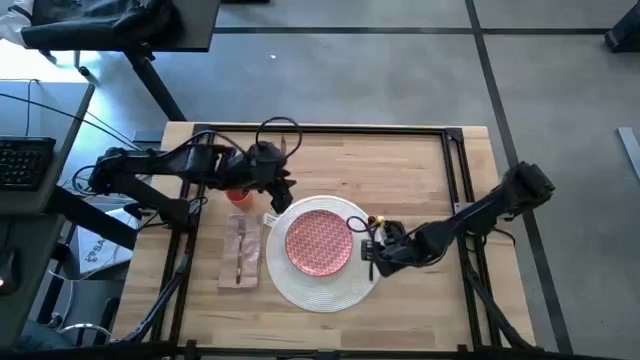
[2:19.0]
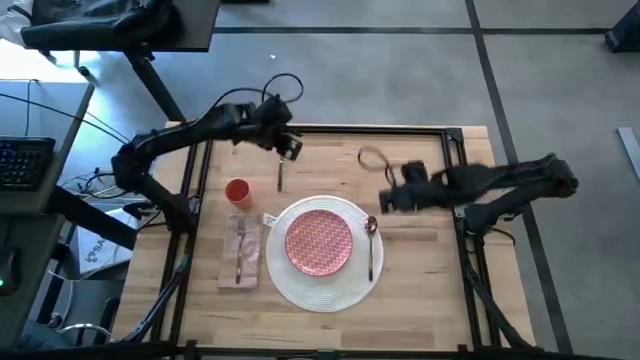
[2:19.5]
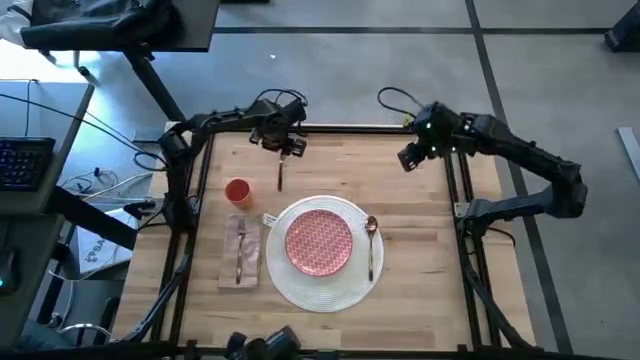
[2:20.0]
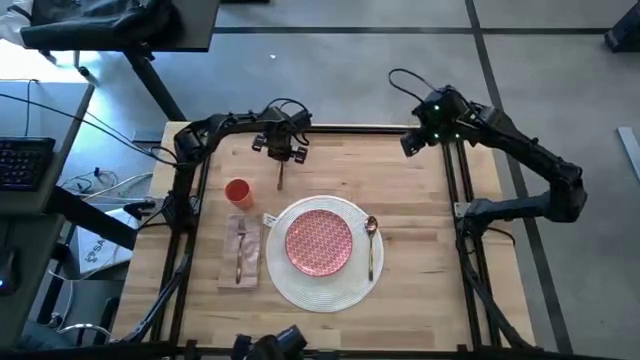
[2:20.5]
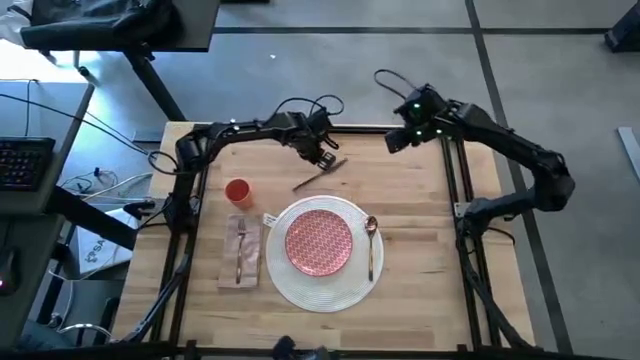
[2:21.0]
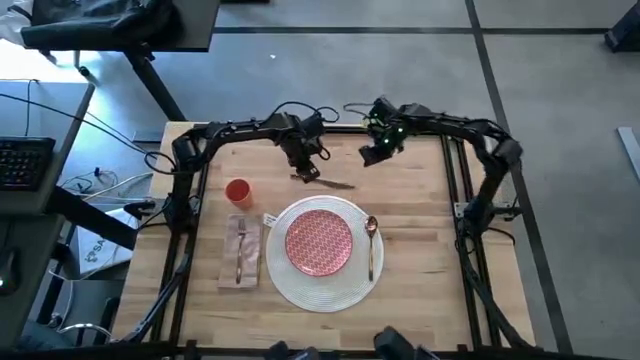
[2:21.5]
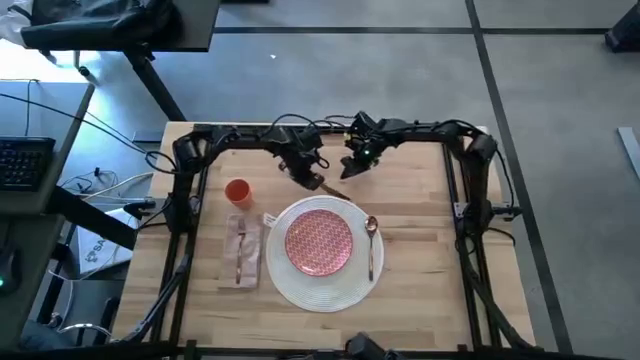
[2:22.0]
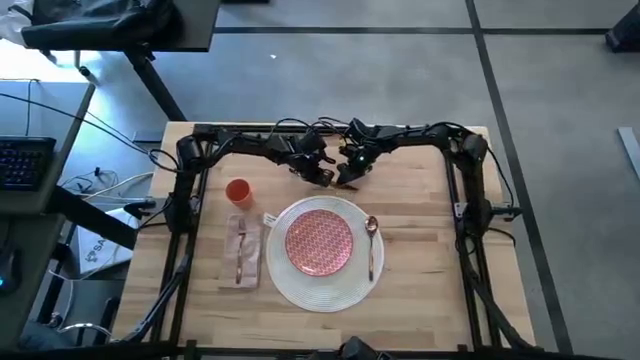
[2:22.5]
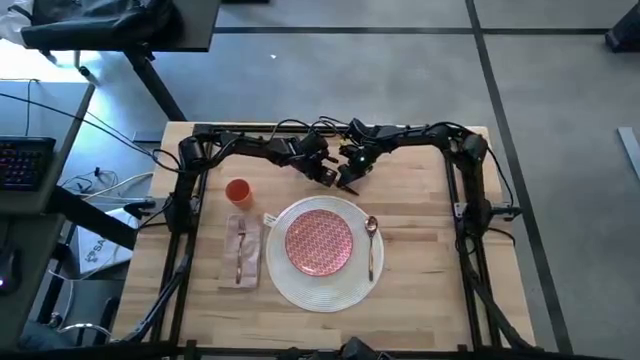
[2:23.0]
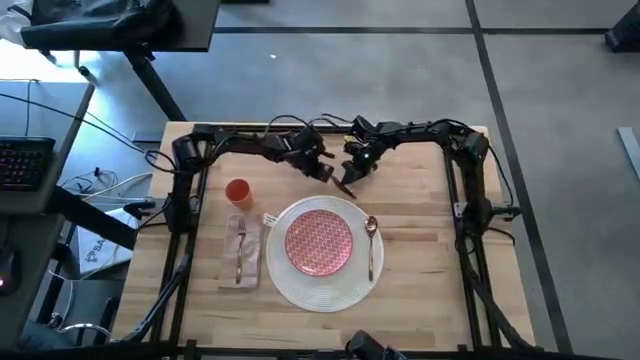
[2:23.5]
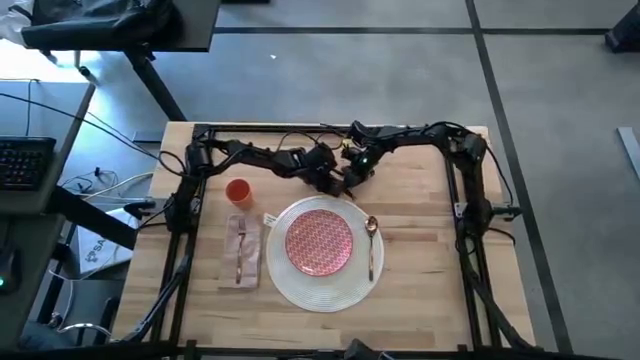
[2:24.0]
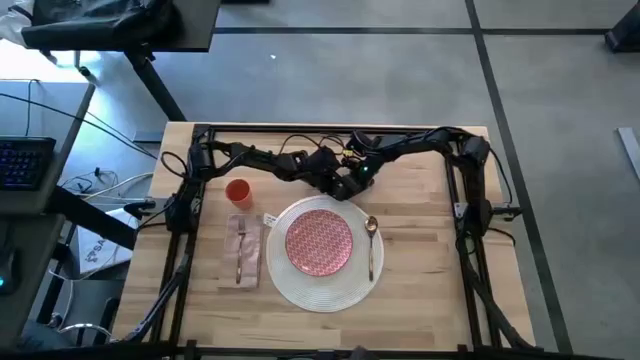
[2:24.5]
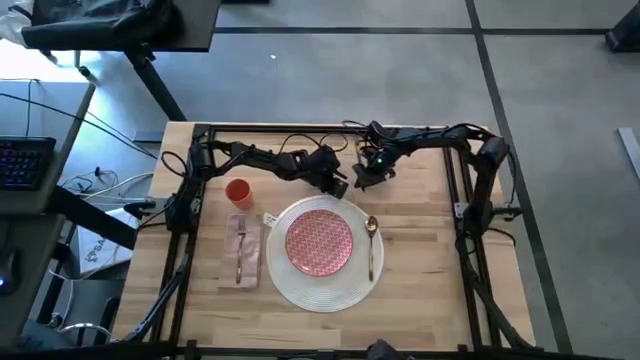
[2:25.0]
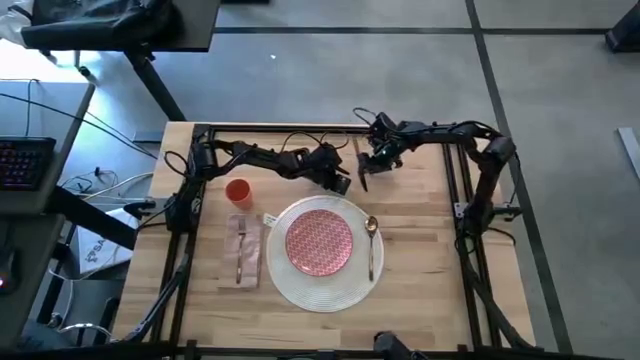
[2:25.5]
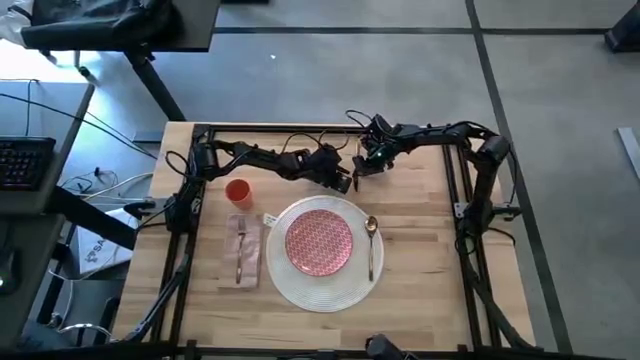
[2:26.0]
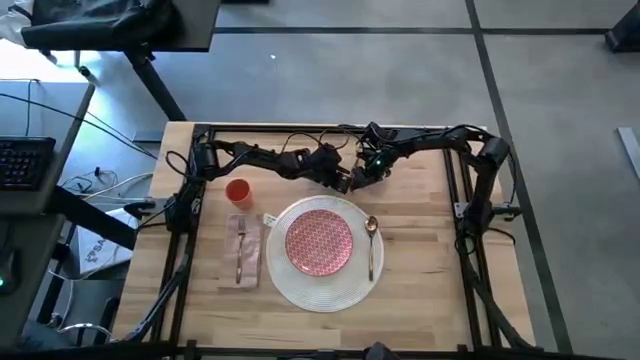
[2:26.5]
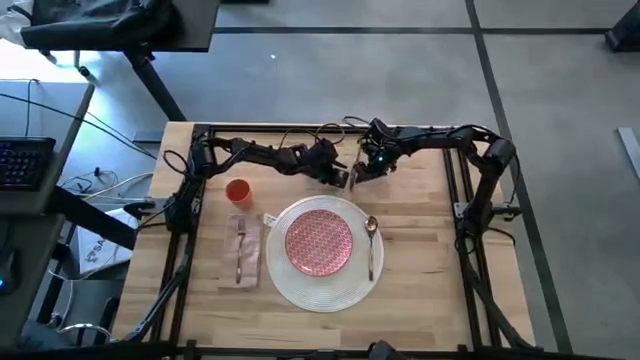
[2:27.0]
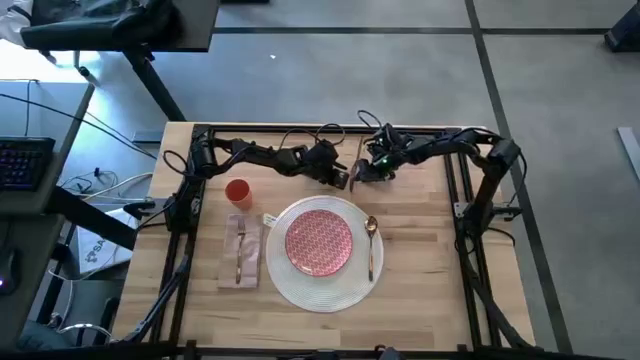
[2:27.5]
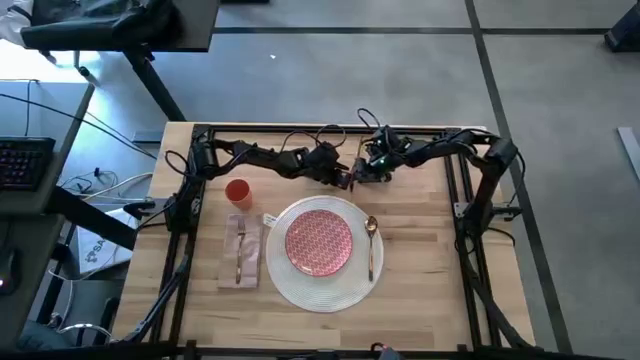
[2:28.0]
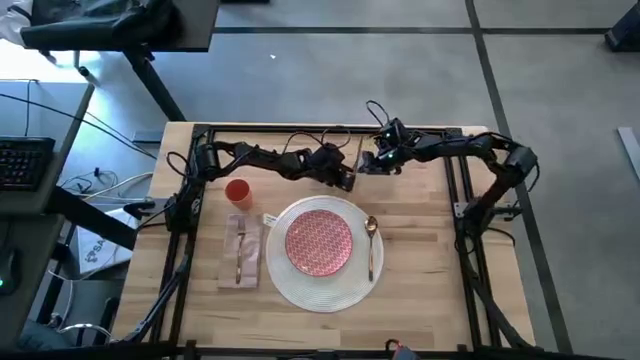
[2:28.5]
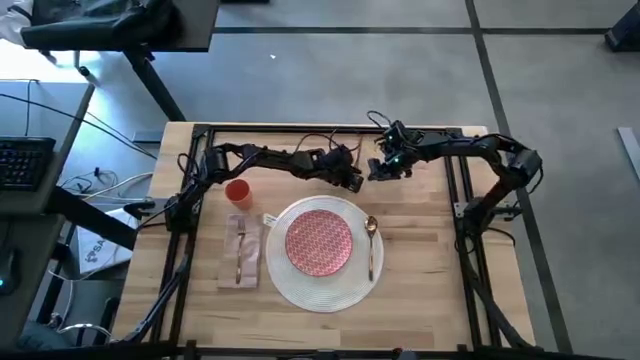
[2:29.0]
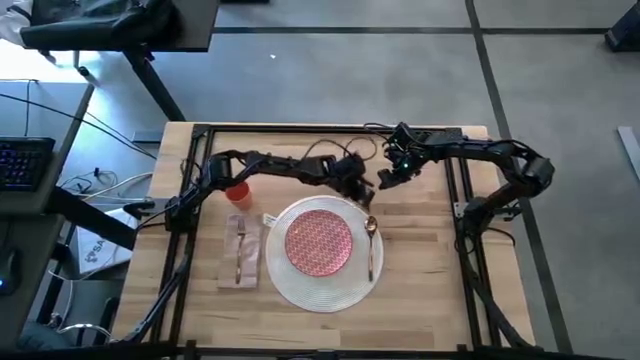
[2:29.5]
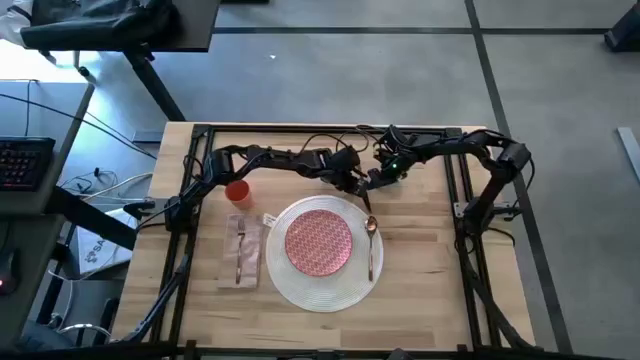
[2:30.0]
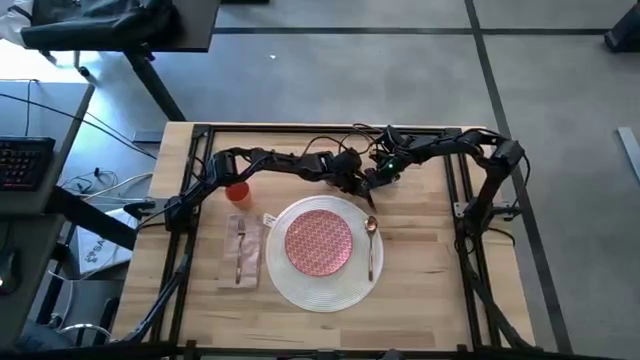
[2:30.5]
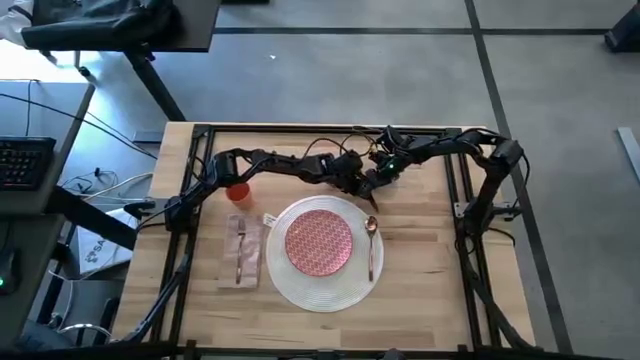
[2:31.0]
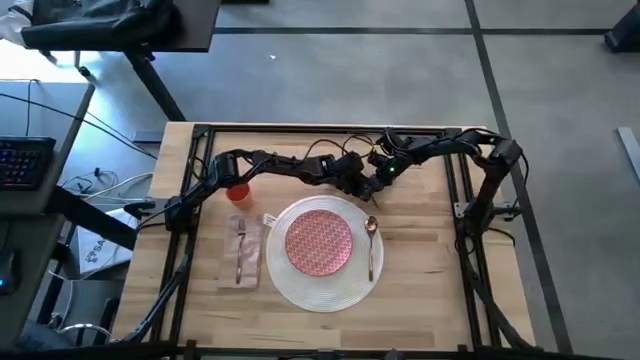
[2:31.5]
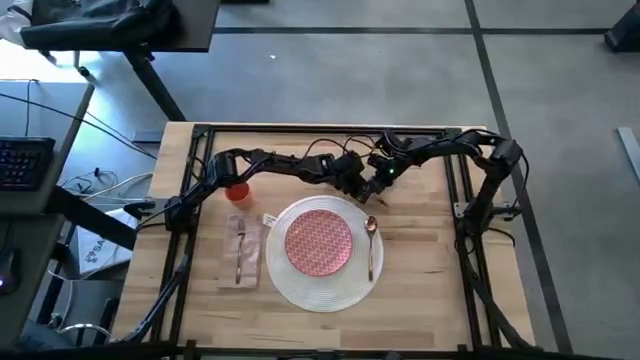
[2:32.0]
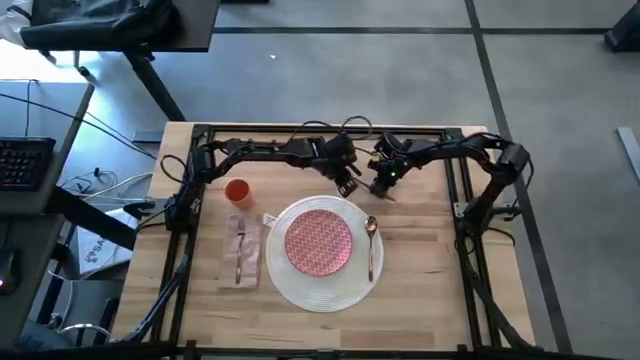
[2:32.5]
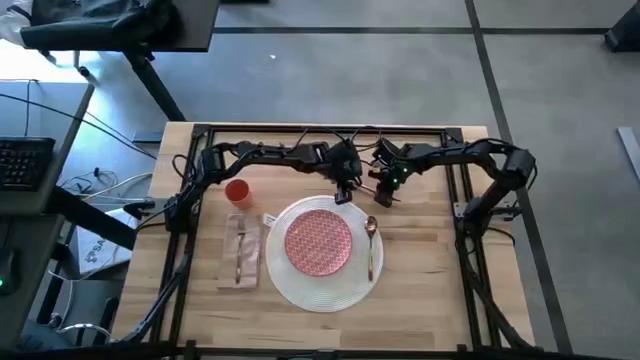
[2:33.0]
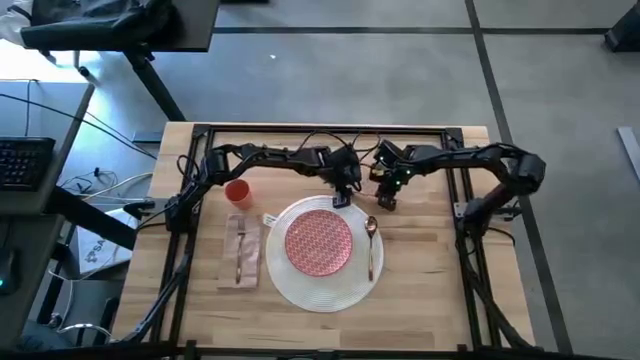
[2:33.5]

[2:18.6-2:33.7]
Task: Set table place
Put the table knife beside the gold fork

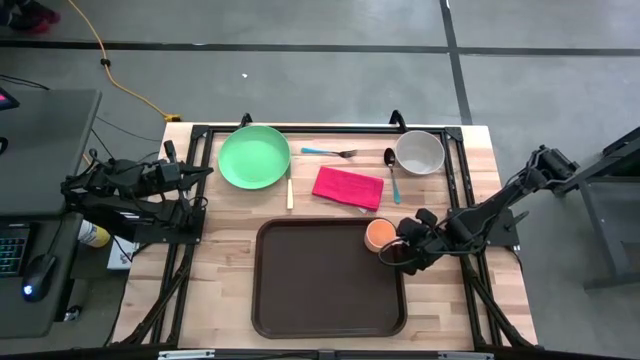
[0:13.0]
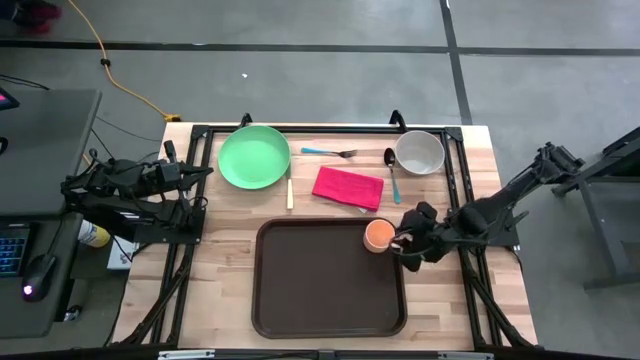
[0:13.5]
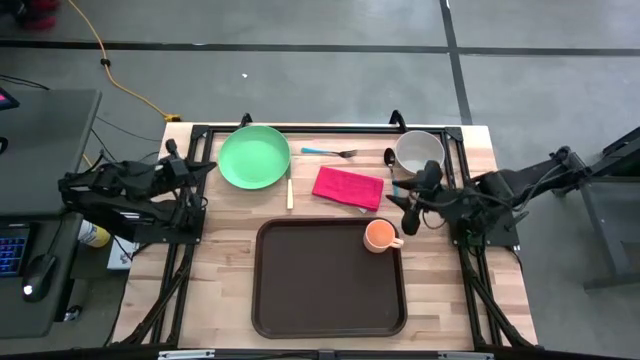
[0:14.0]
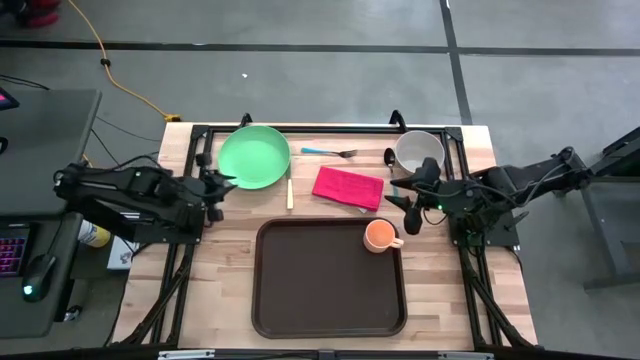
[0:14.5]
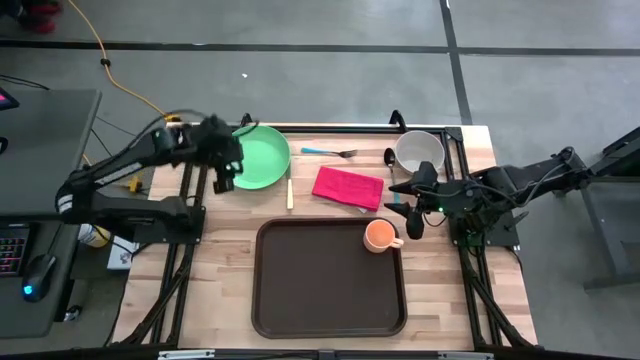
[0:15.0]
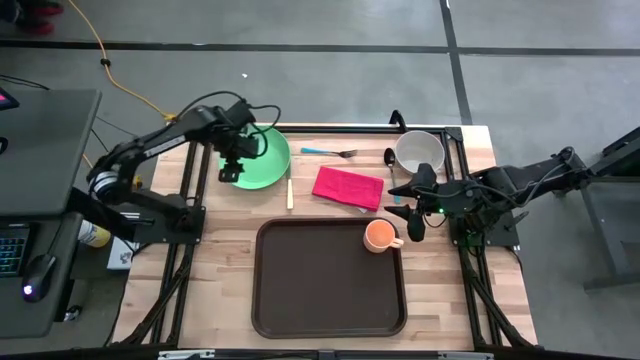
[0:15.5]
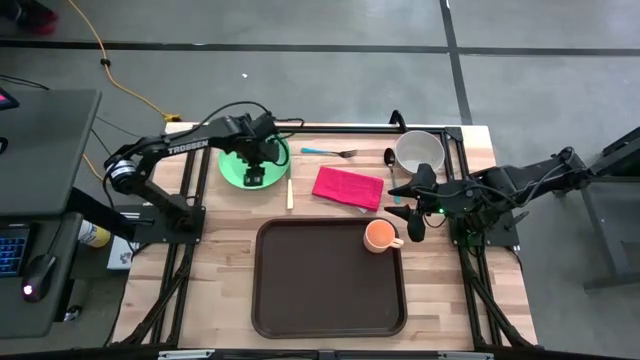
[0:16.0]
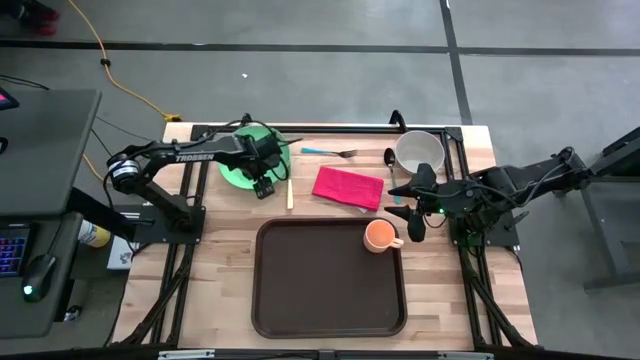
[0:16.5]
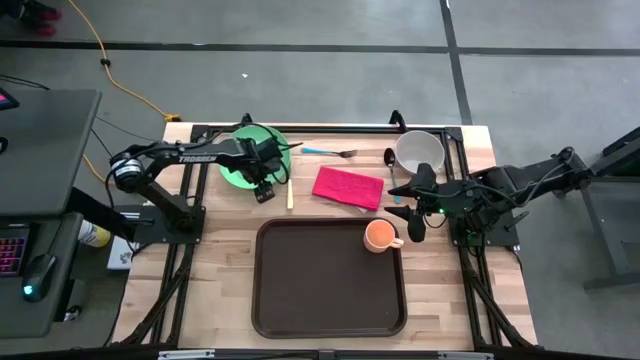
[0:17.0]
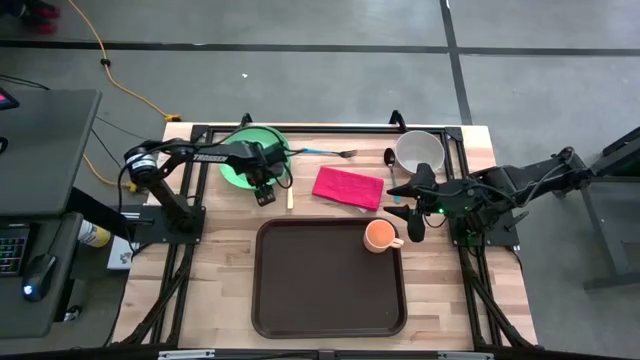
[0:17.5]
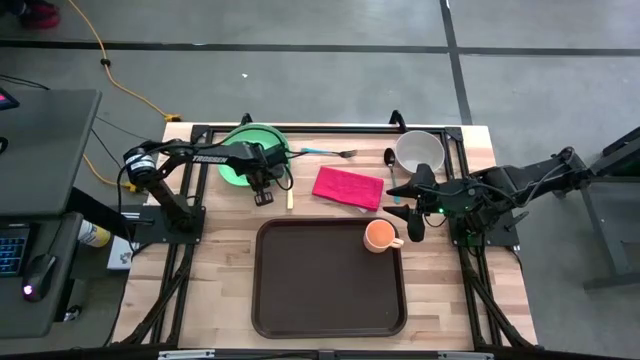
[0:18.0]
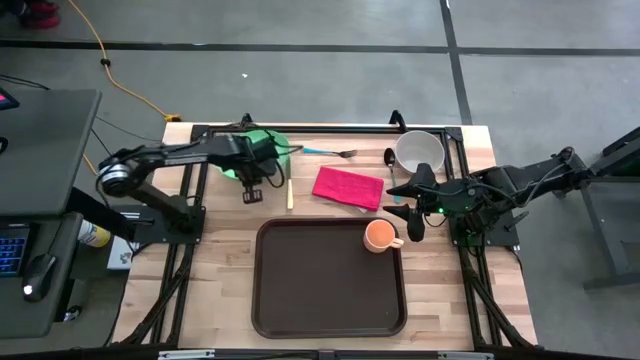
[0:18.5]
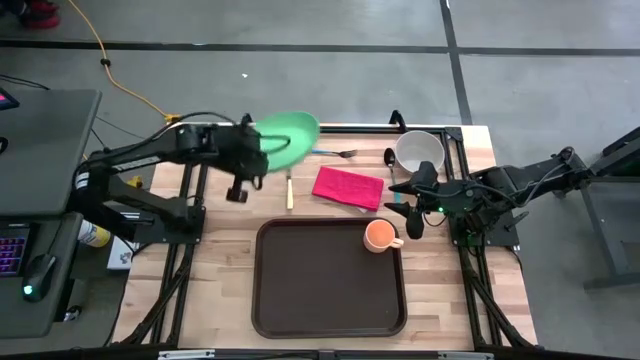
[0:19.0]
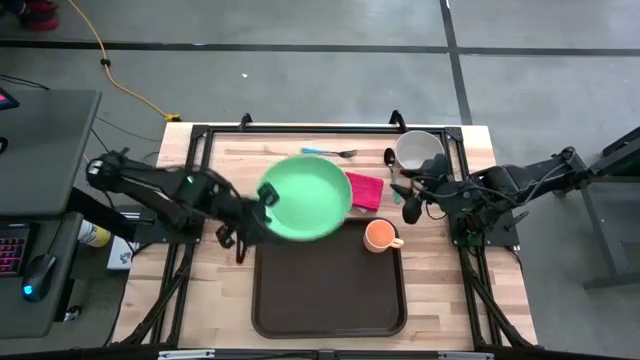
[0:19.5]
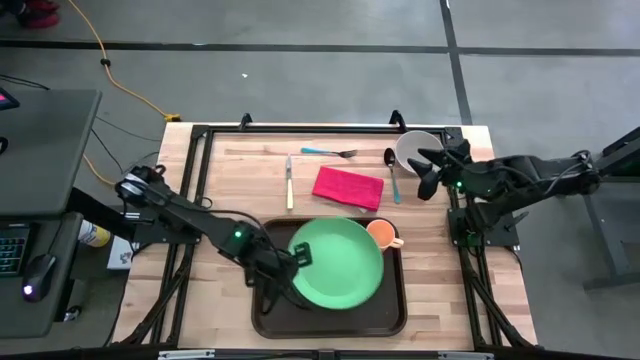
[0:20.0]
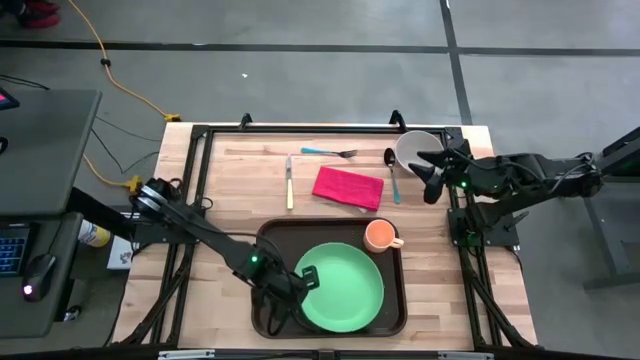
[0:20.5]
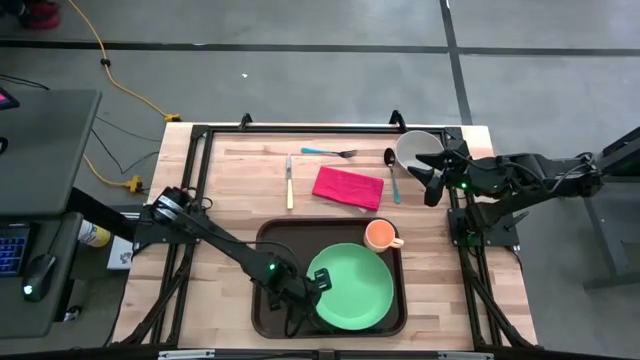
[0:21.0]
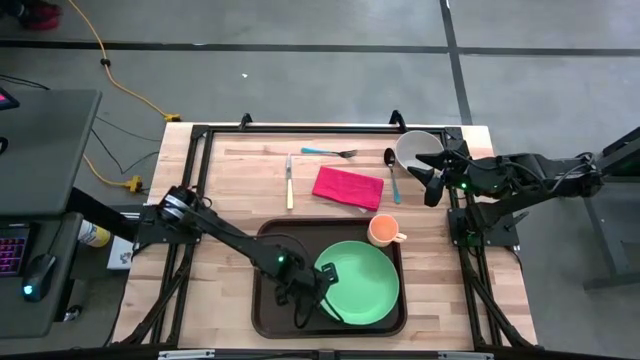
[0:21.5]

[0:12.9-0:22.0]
Task: Set up tray
Put the green plate on the brown tray
